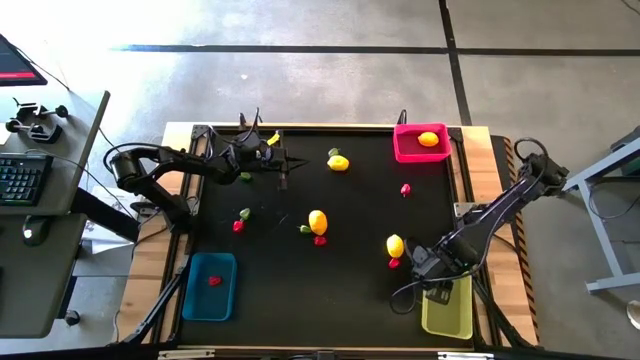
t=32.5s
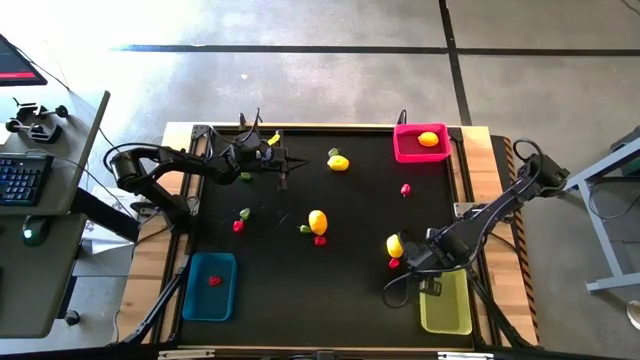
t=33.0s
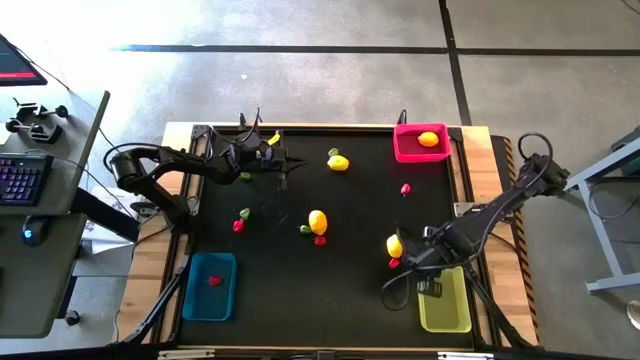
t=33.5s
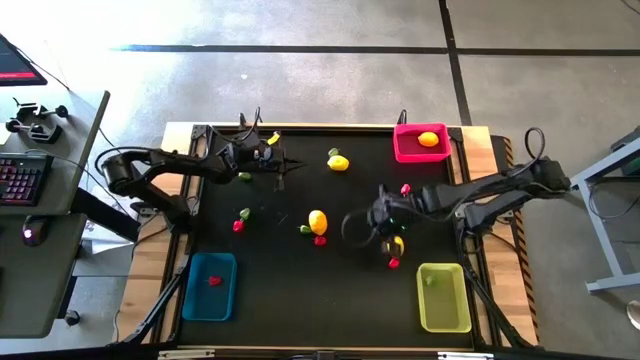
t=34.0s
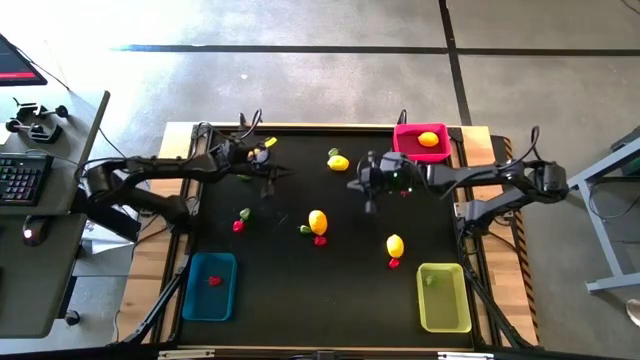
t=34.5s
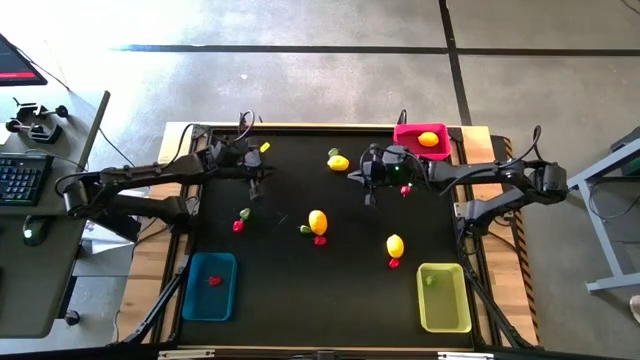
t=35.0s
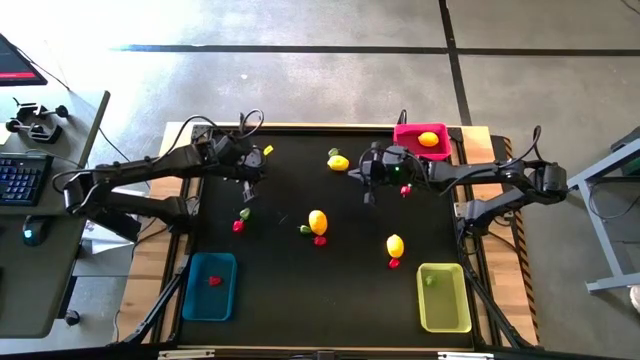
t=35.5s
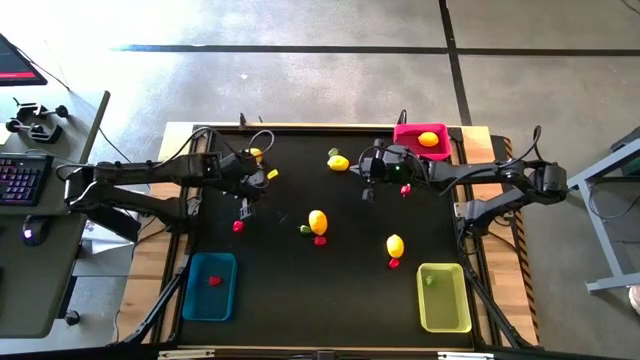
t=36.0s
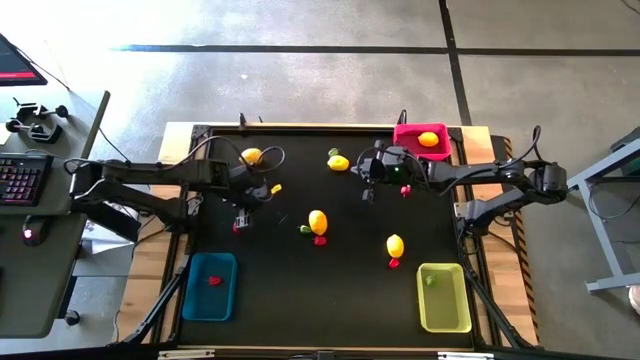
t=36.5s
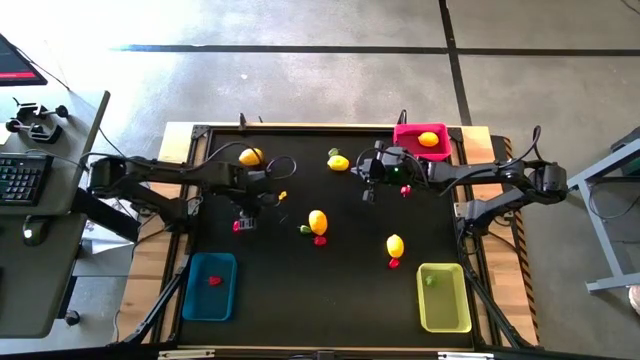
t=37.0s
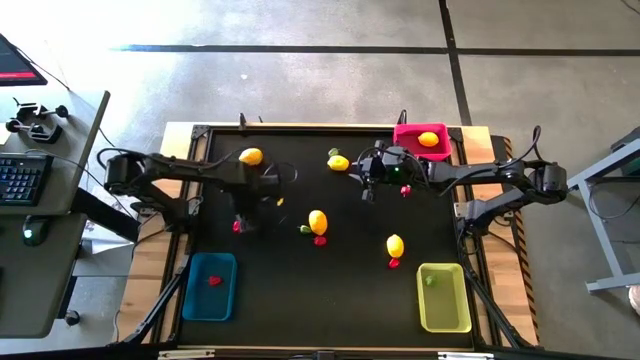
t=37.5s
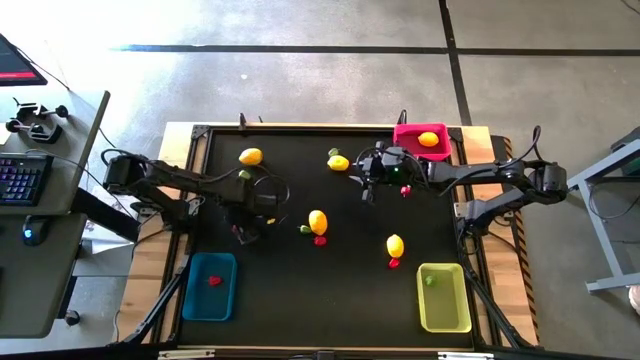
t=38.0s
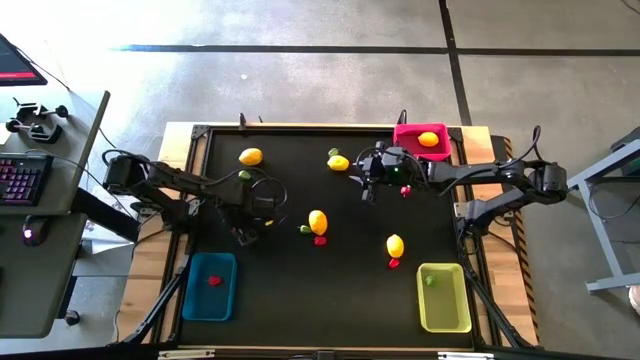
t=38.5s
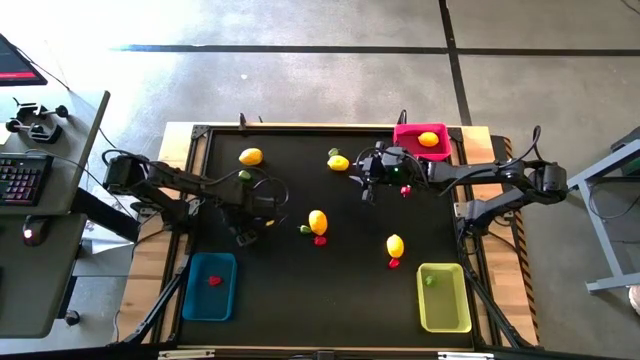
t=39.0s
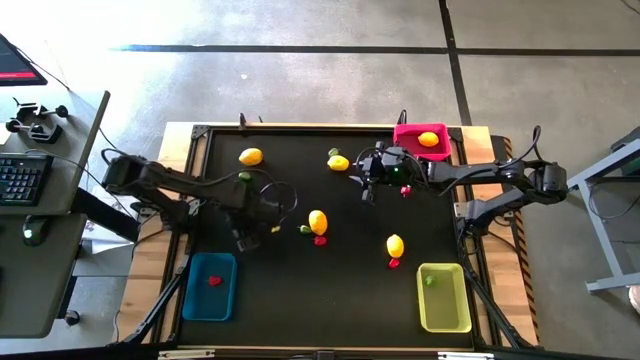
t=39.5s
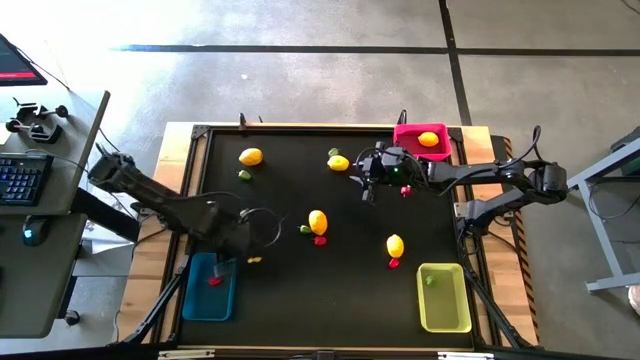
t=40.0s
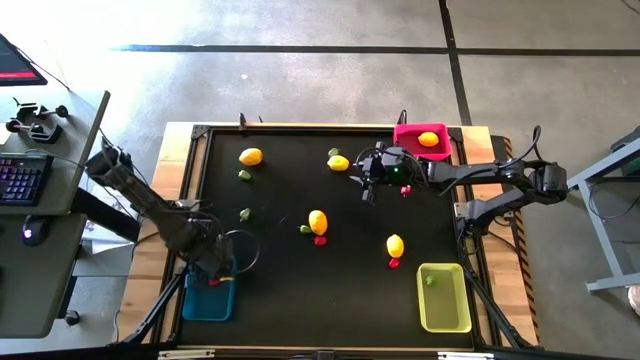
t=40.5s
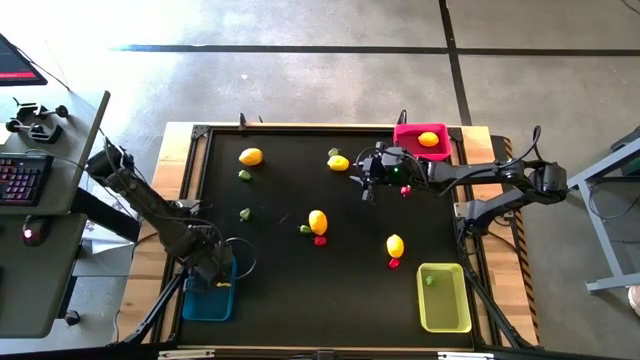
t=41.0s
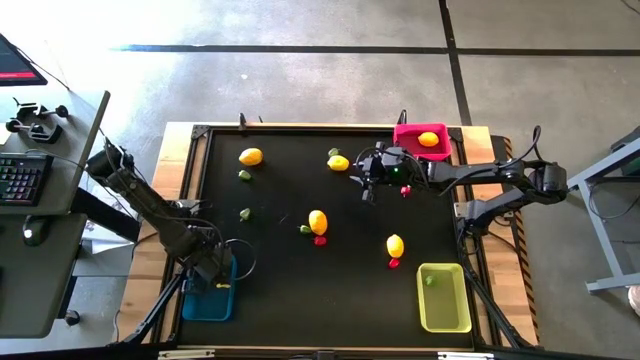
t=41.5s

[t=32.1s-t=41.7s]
Task: Sort produce into baskets
Put the red chilli pepper into the blue bin

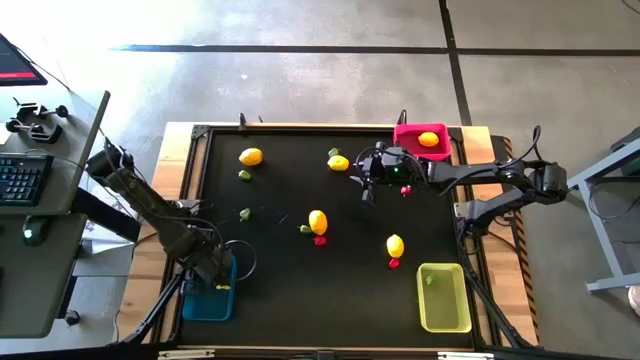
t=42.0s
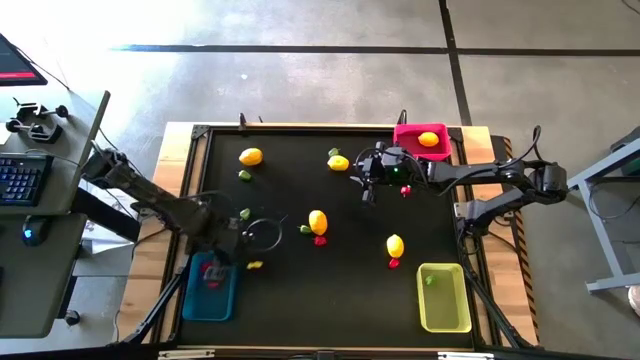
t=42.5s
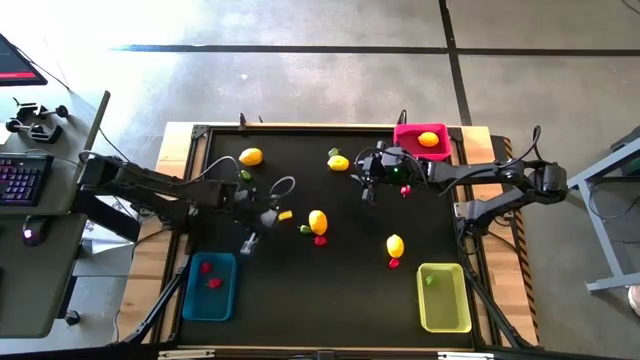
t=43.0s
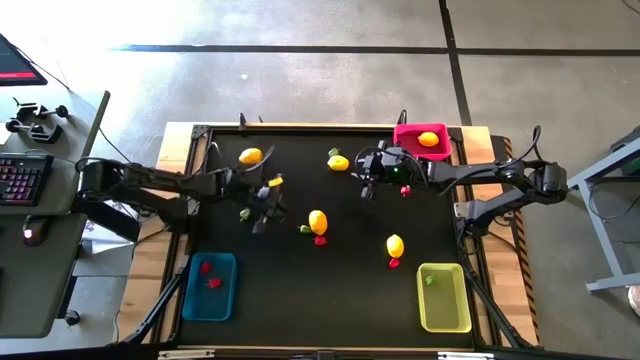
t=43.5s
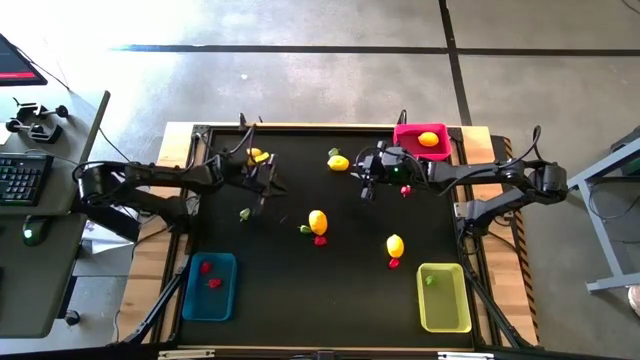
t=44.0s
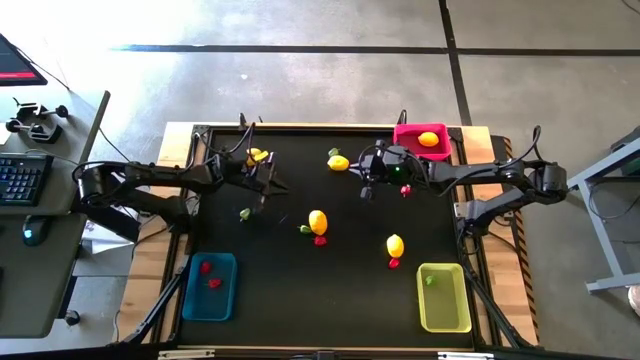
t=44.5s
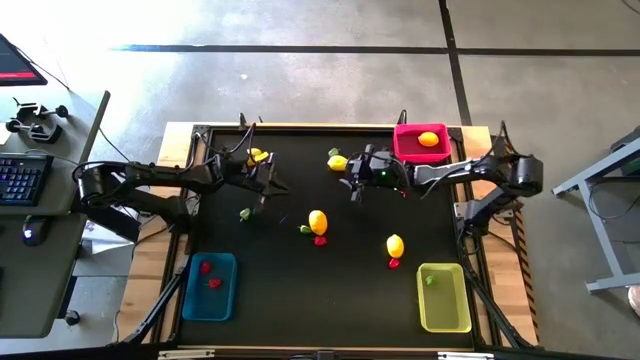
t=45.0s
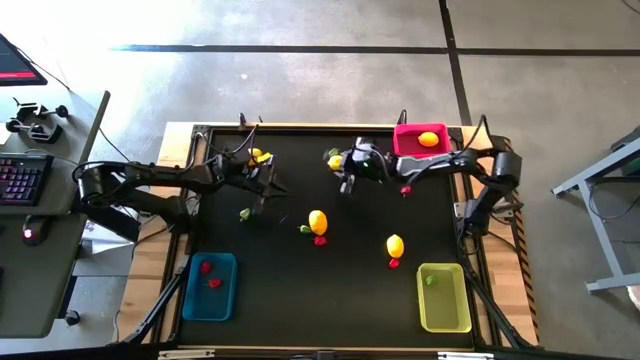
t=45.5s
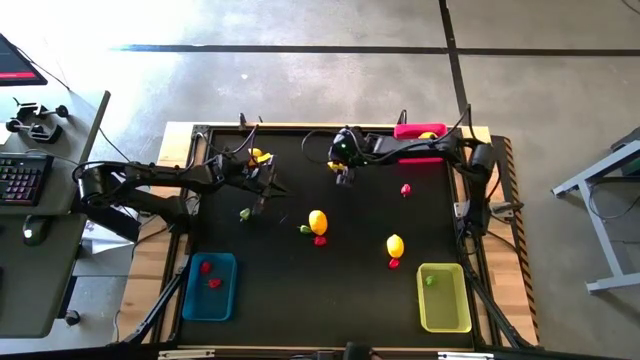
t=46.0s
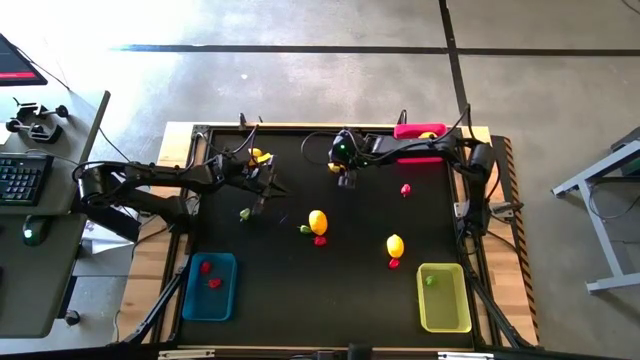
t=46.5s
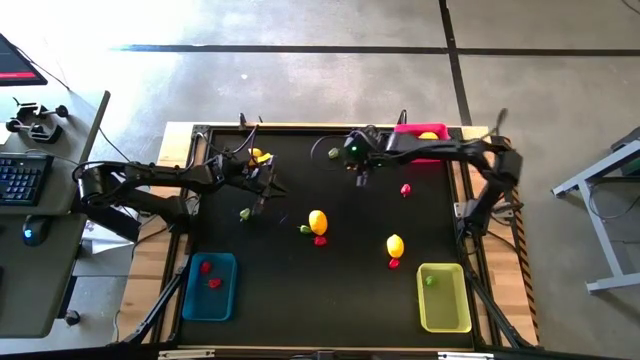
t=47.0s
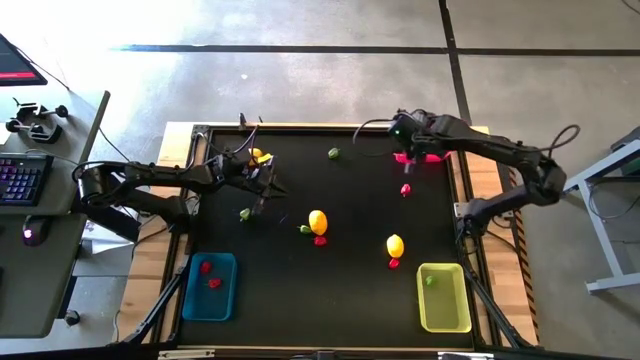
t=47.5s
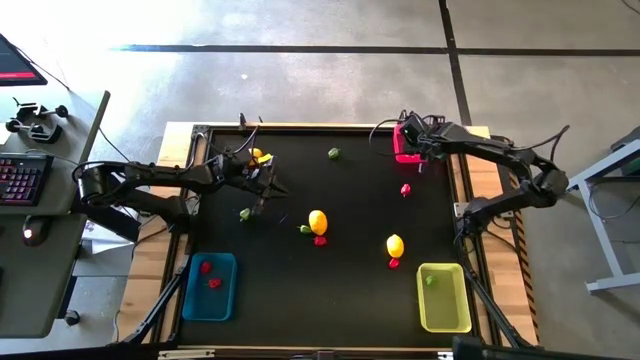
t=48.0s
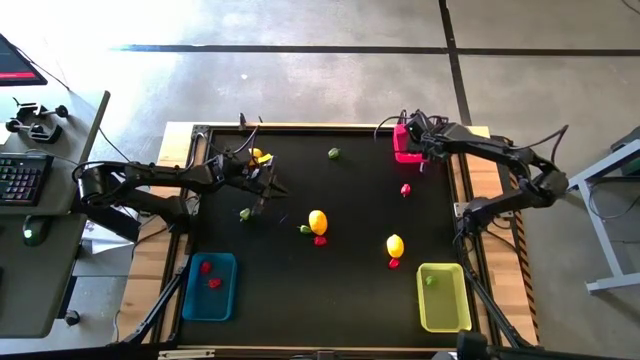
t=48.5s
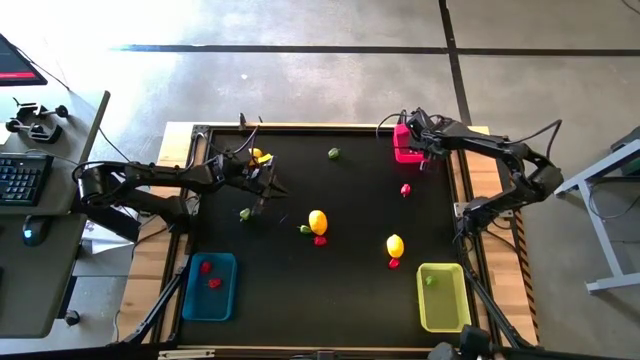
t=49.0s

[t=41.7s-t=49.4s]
Put the lemon into the pink bin

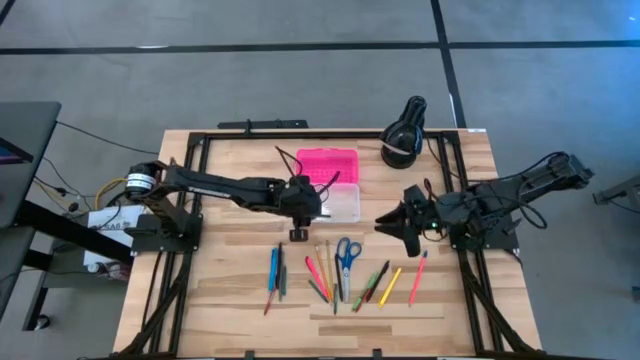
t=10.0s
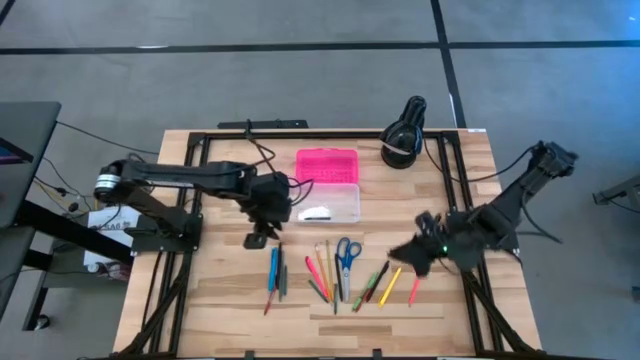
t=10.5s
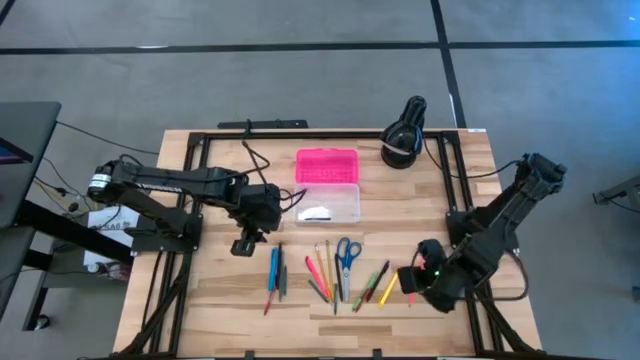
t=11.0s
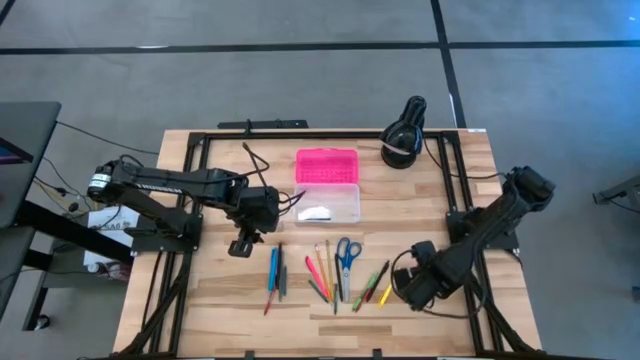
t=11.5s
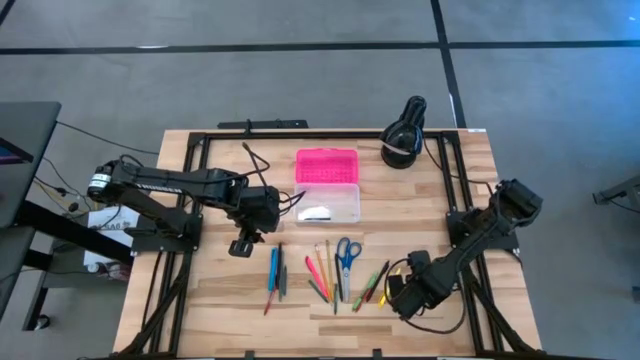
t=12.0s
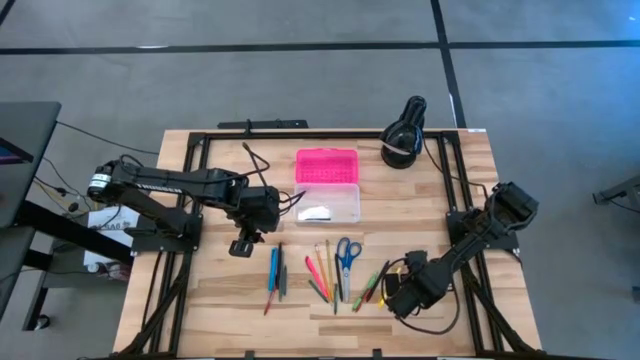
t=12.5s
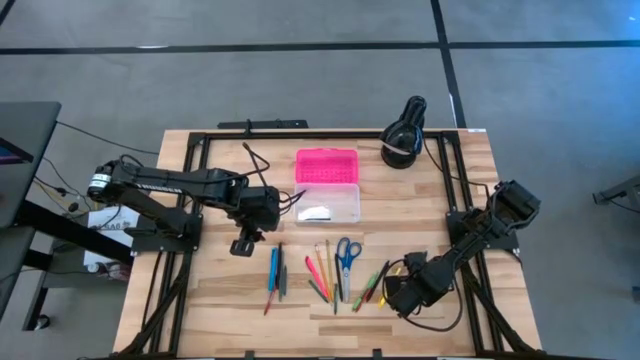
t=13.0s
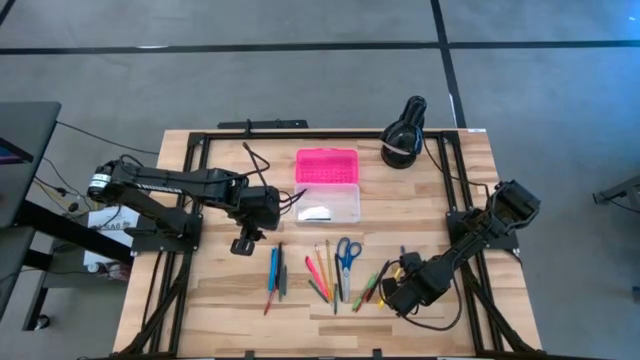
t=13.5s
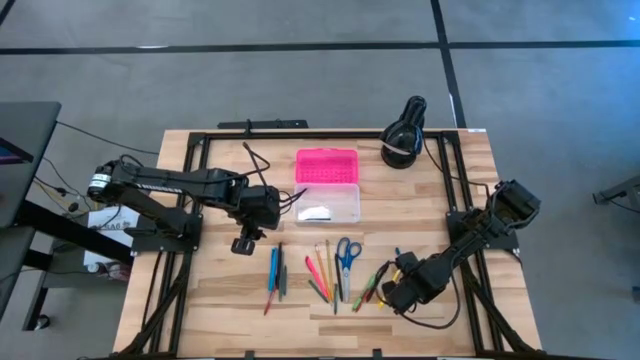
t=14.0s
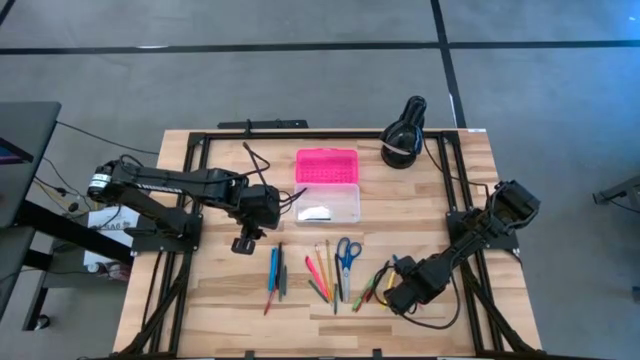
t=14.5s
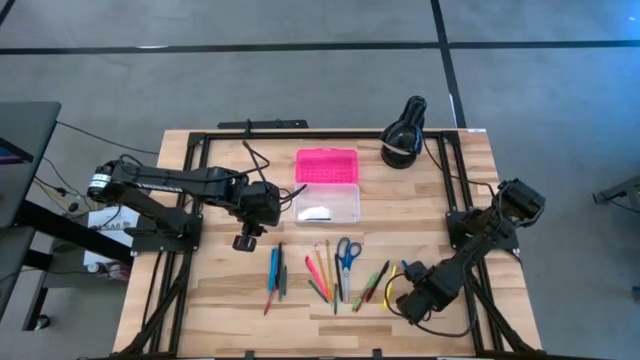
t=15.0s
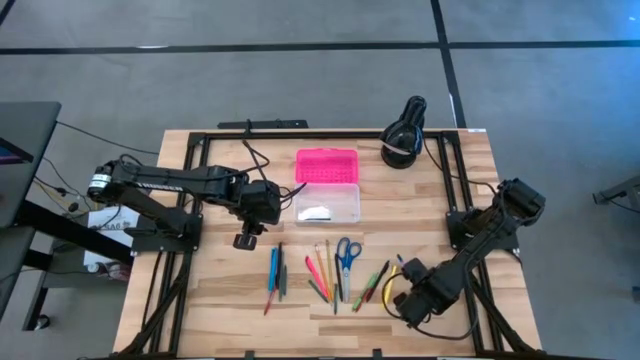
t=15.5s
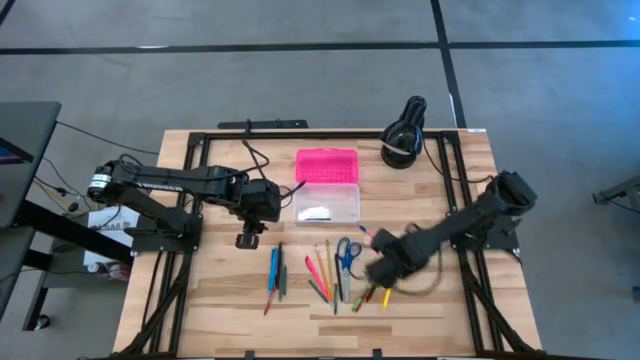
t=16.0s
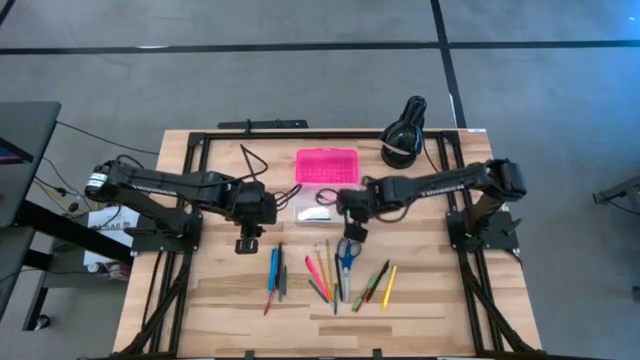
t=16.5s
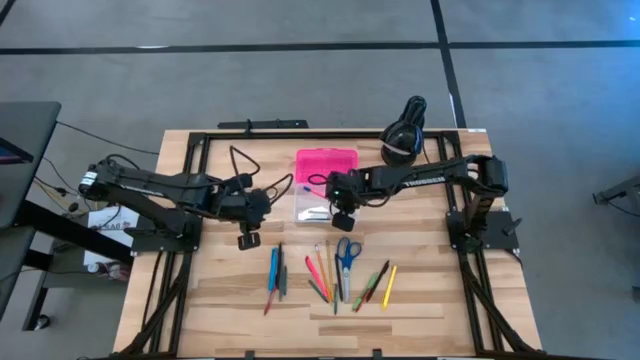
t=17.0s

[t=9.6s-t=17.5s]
Task: Pick & place school supplies into a supply box
Put the pink pencil into the pink supply box
